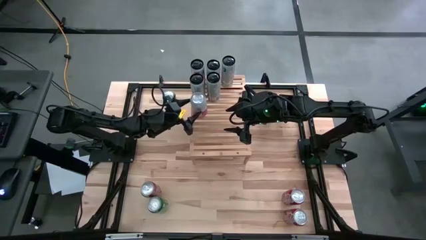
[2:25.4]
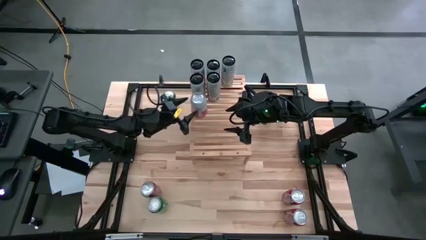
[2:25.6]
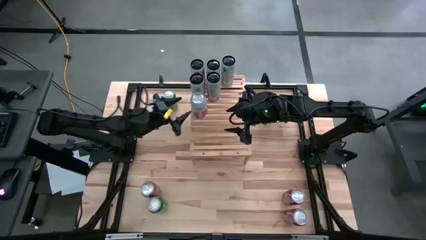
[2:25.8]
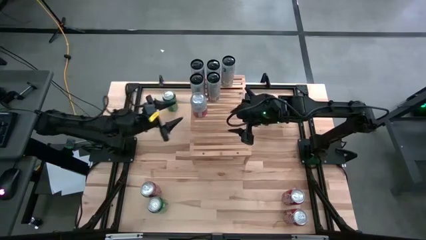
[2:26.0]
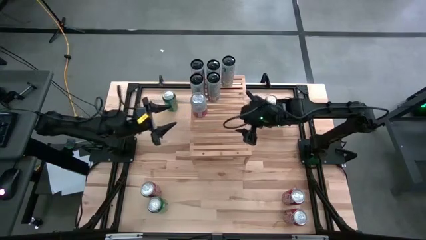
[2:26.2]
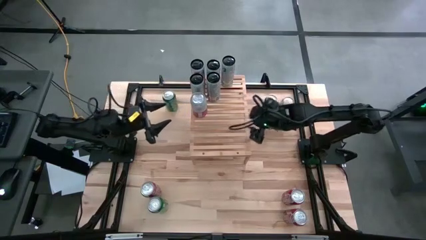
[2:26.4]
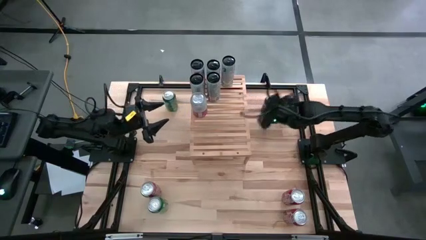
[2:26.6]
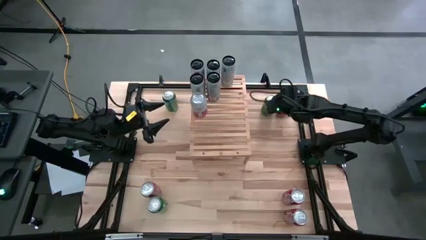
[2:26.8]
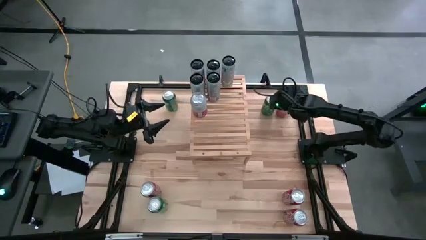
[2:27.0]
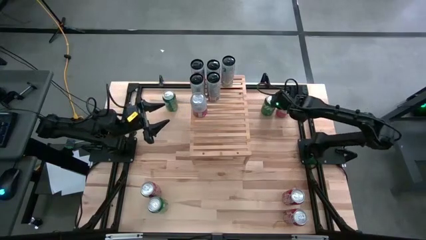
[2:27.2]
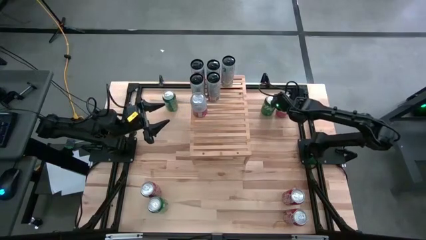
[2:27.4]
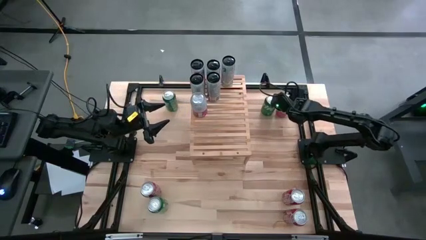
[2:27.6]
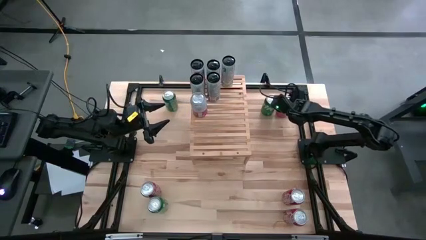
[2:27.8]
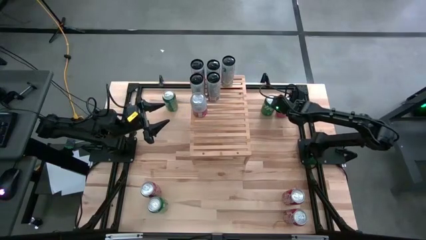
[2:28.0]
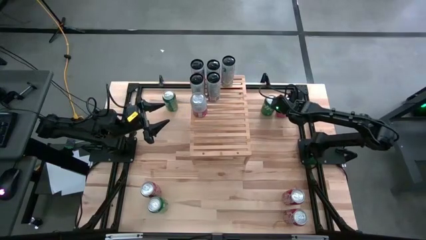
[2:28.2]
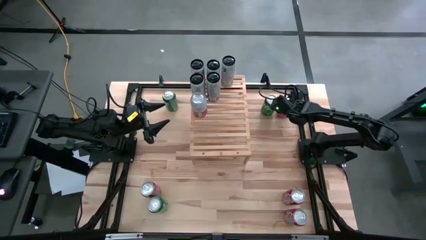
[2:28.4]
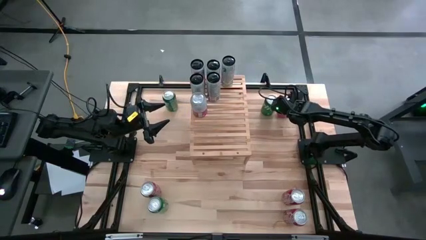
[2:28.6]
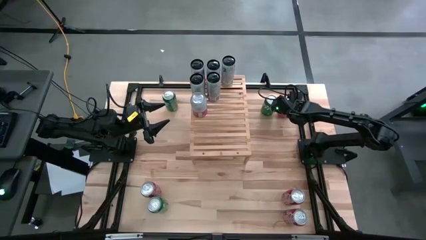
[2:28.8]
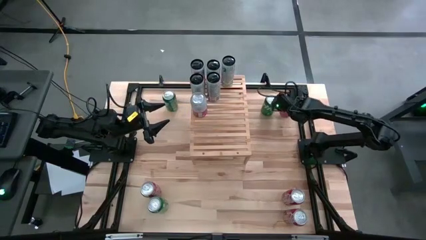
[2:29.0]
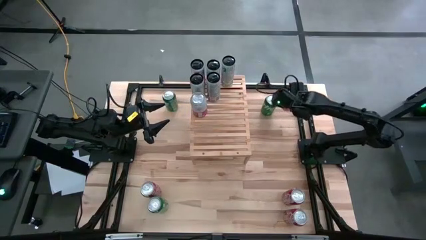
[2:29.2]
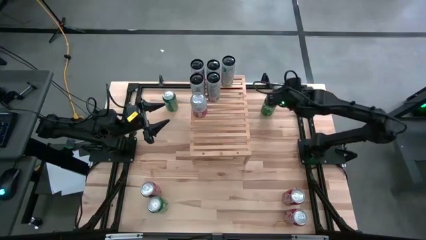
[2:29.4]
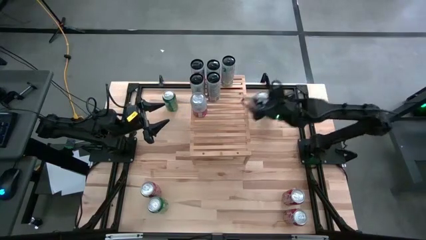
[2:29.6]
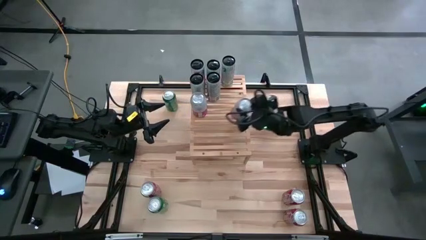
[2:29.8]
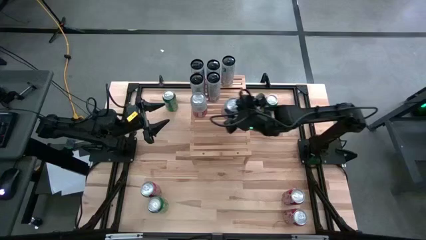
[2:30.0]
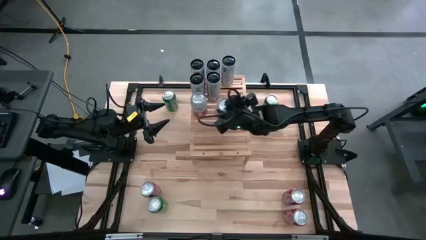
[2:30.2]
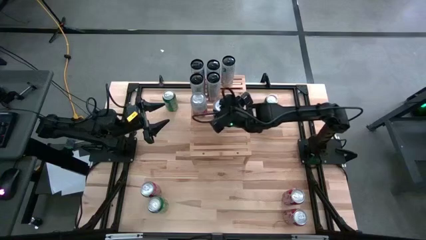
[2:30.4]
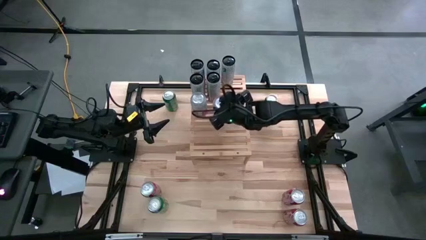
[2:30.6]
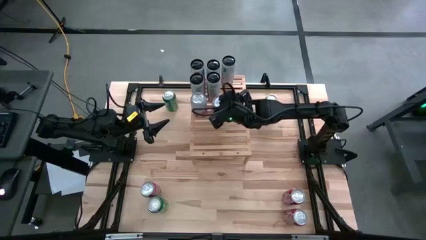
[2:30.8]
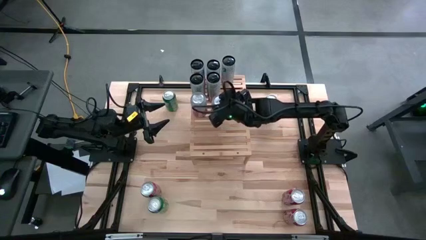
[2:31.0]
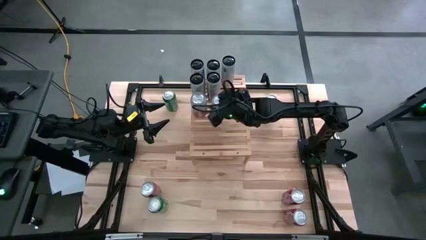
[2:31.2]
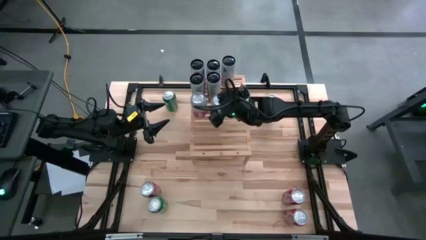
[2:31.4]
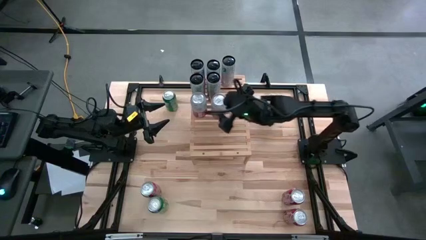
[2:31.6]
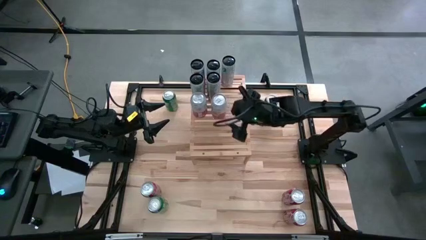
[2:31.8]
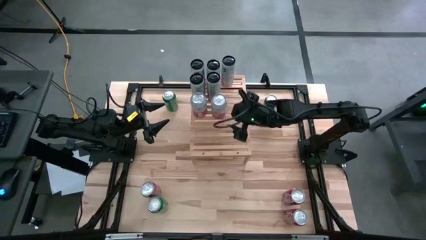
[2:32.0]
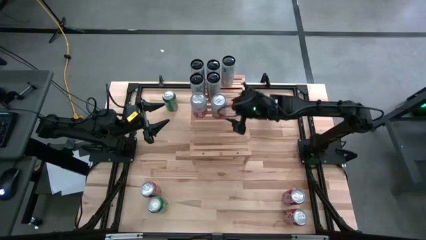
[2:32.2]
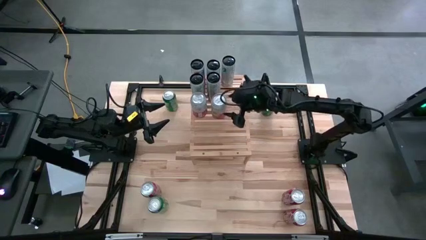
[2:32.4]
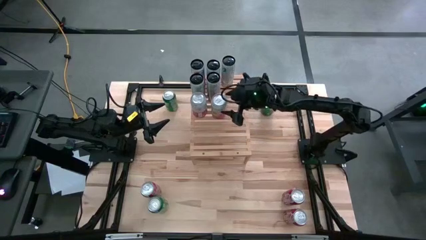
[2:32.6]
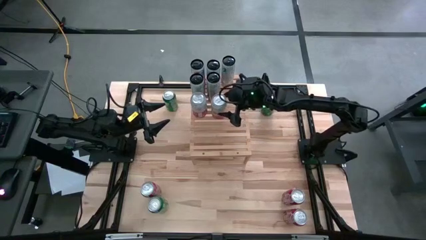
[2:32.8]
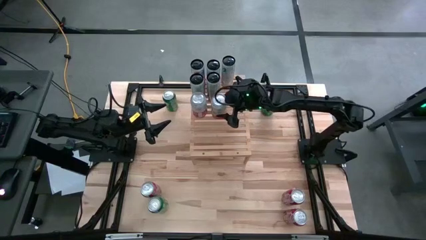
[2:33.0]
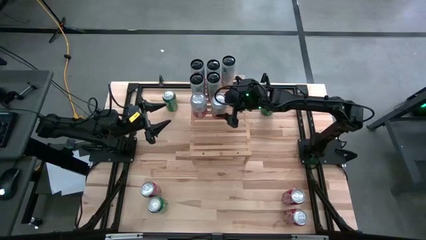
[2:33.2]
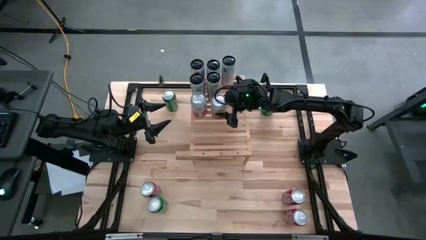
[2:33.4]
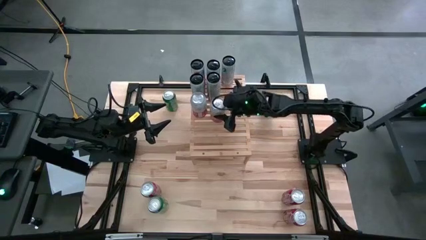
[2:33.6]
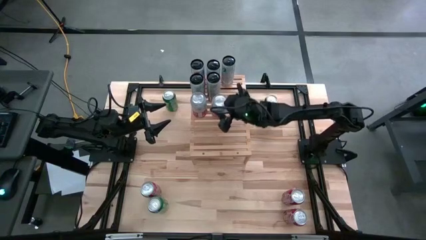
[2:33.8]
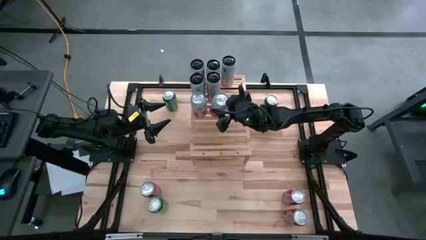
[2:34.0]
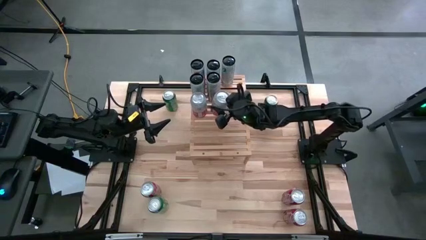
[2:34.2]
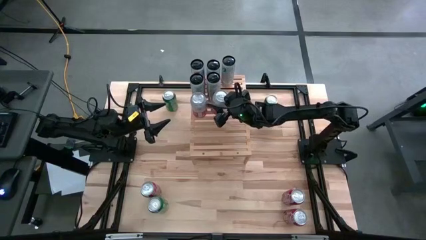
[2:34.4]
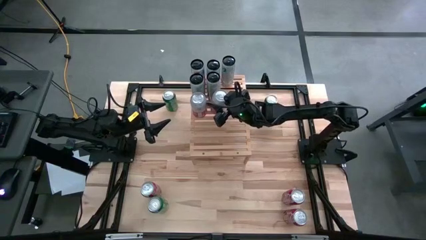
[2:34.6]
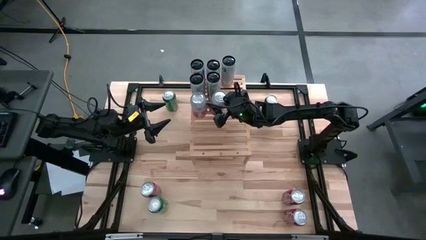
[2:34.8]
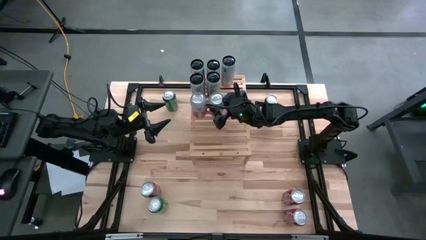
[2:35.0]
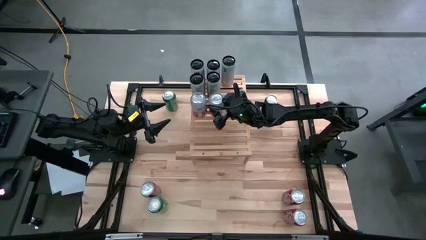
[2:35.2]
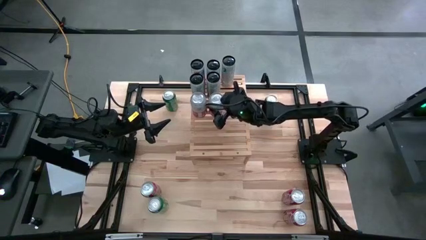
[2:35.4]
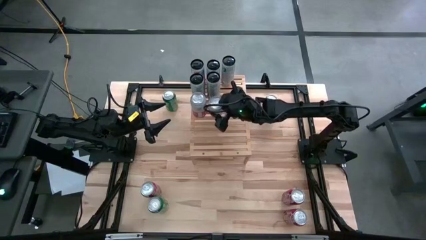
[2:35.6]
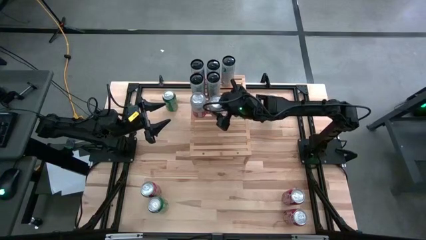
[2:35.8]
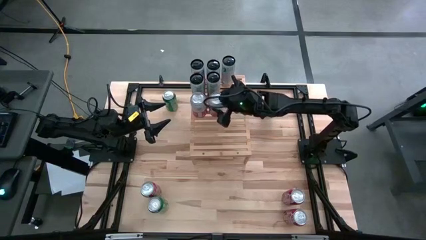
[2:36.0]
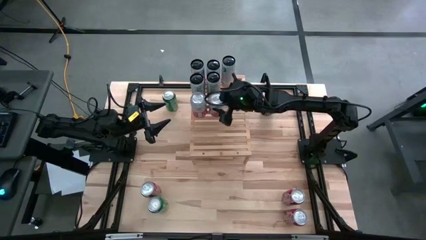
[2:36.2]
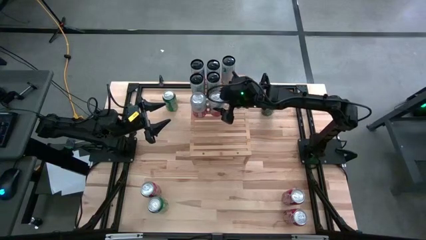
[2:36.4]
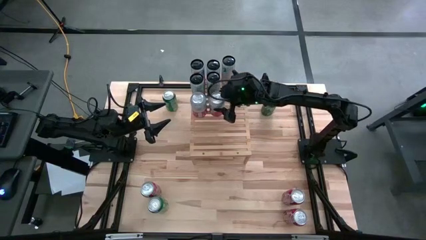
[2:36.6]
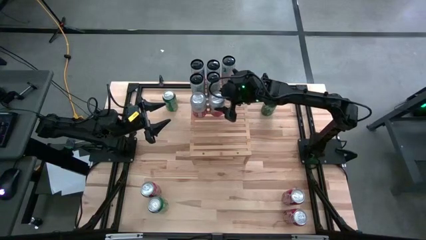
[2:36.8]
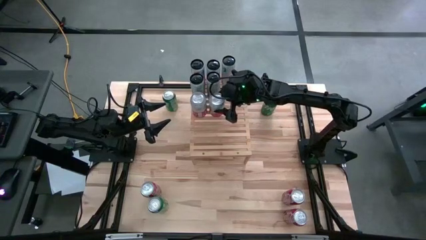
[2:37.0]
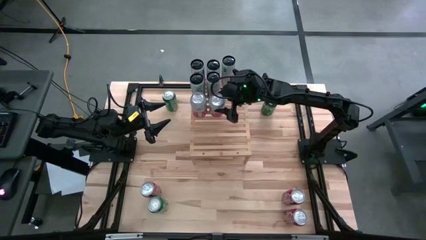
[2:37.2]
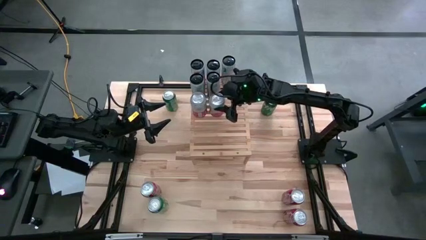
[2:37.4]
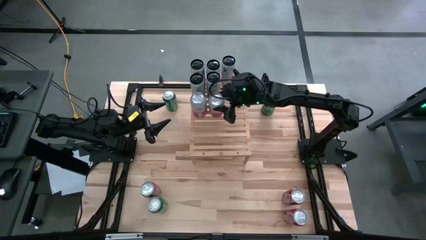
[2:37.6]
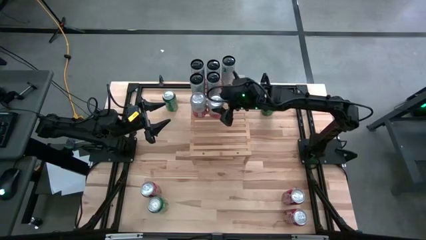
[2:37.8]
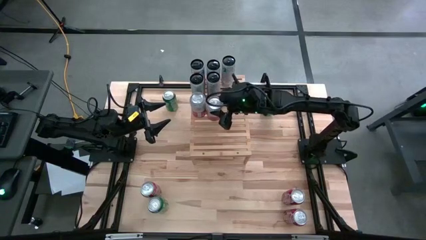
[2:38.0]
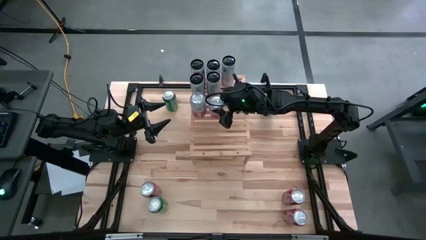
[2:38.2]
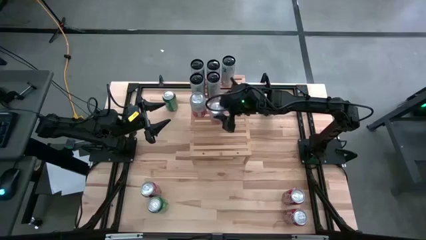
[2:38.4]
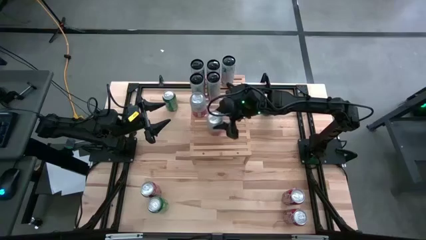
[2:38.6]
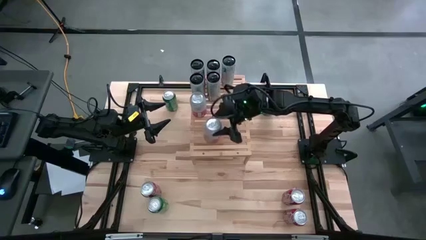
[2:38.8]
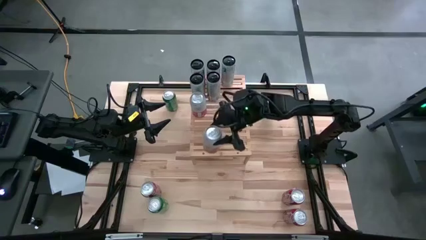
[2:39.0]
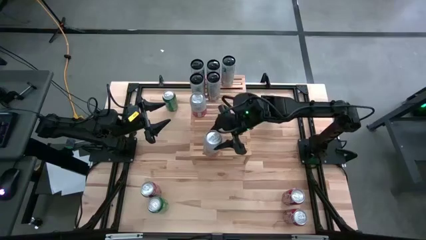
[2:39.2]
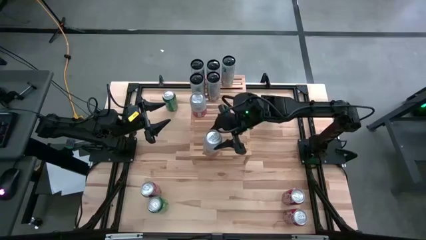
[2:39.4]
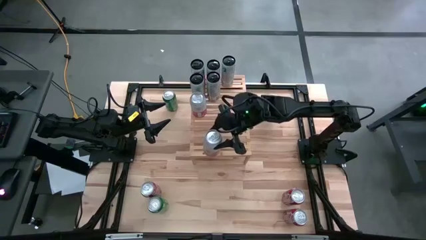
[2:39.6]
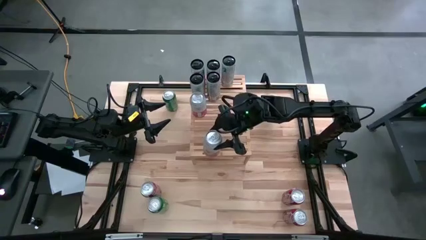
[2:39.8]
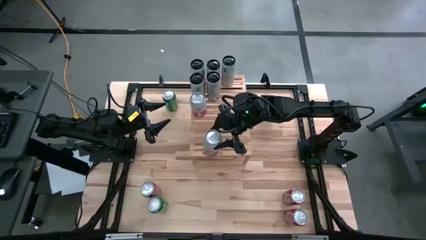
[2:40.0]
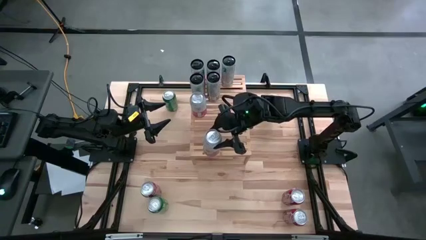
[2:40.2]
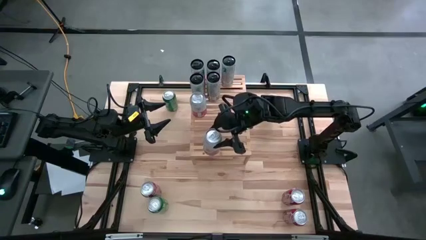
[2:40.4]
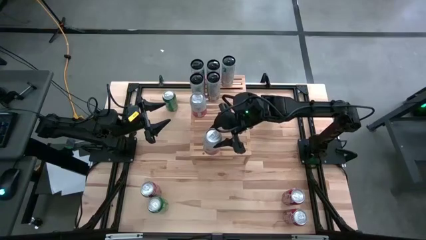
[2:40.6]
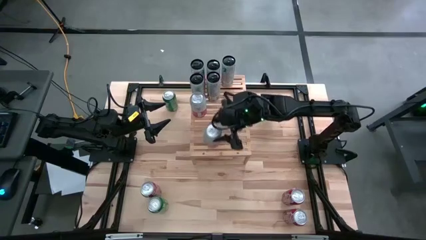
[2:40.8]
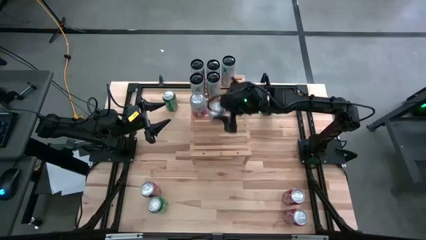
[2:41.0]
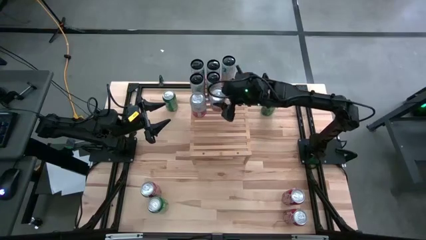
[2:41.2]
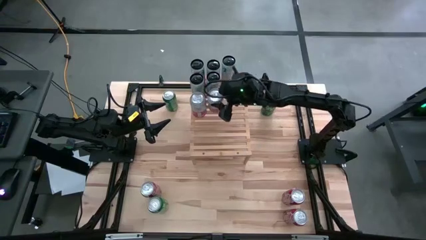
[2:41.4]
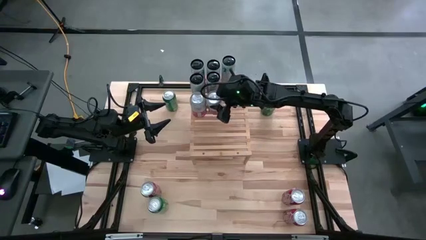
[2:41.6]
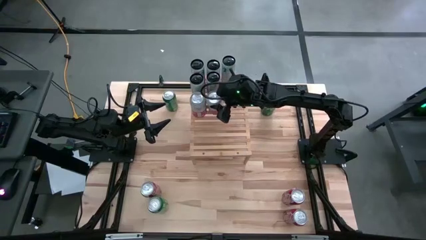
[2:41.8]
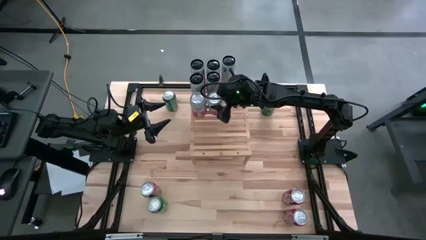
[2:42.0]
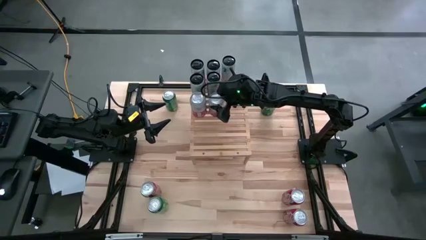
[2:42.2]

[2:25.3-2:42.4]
Task: Place canned beverage on shelf
Put the white and pink soda can aligned with the other white and pink soda can on the shelf
